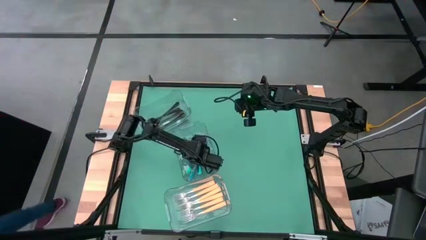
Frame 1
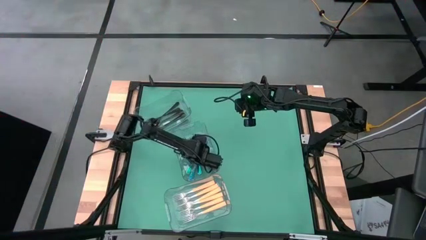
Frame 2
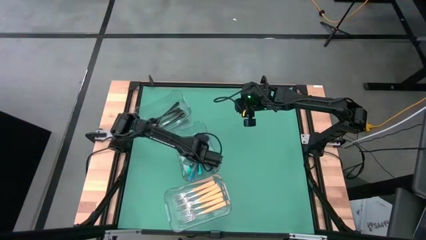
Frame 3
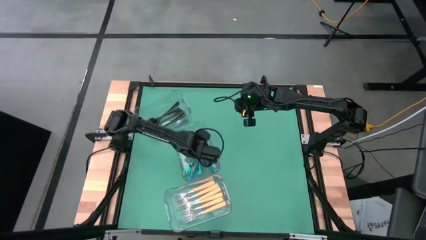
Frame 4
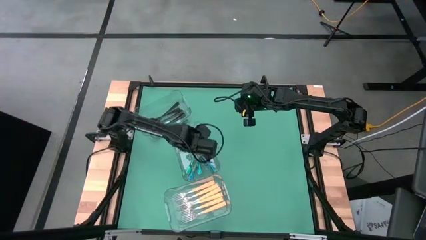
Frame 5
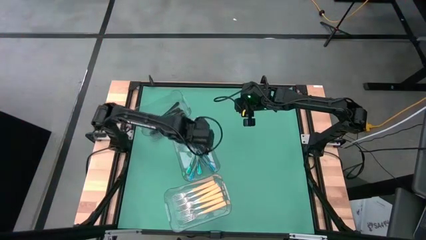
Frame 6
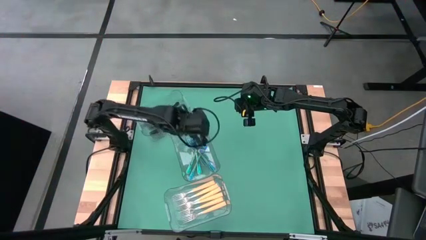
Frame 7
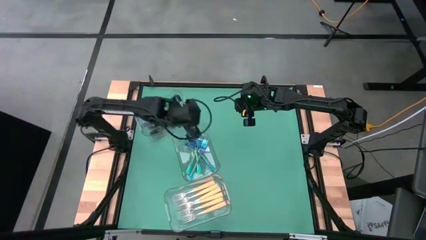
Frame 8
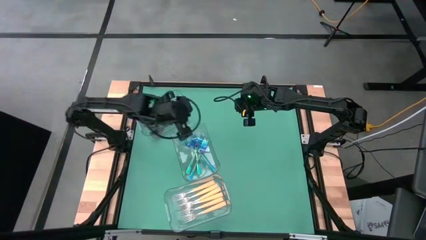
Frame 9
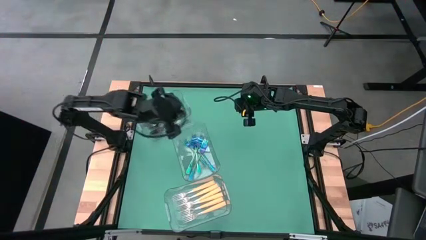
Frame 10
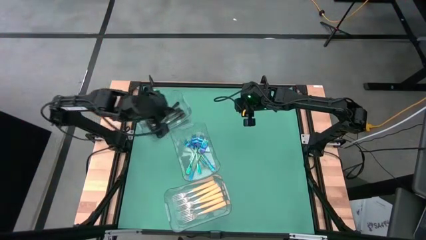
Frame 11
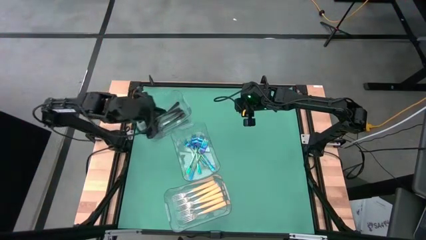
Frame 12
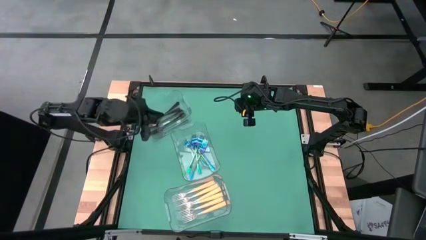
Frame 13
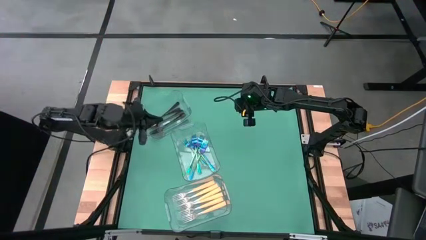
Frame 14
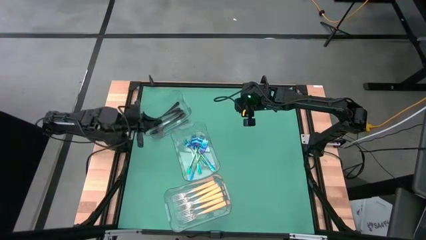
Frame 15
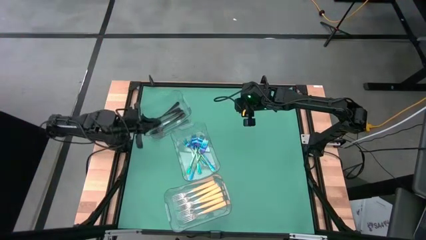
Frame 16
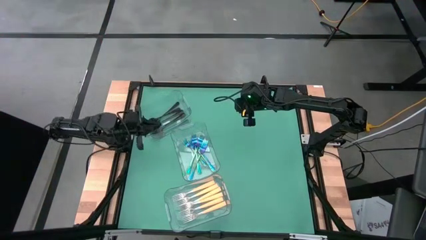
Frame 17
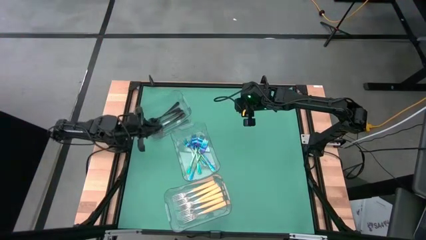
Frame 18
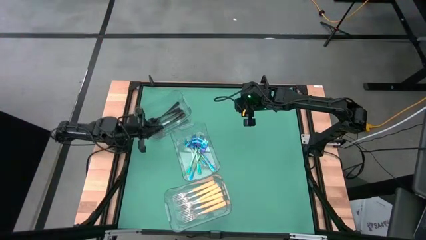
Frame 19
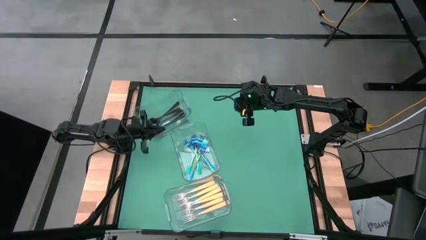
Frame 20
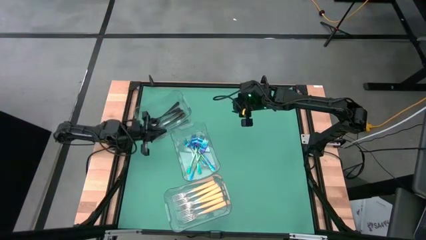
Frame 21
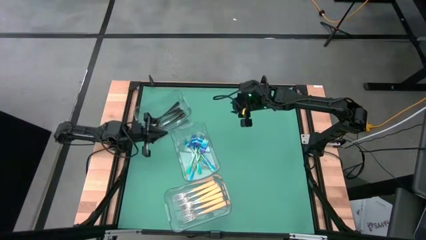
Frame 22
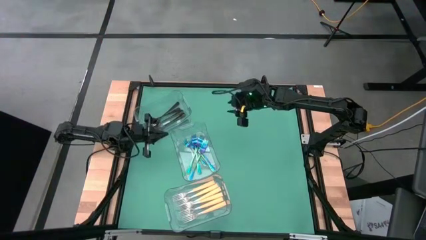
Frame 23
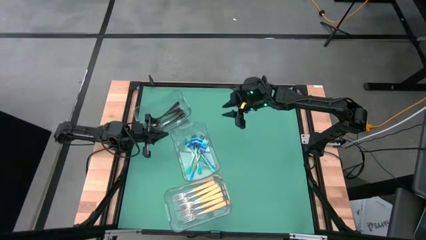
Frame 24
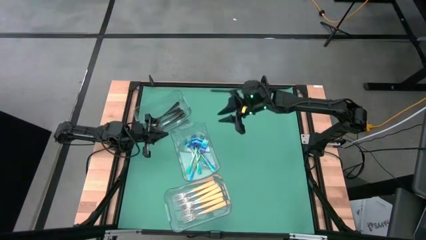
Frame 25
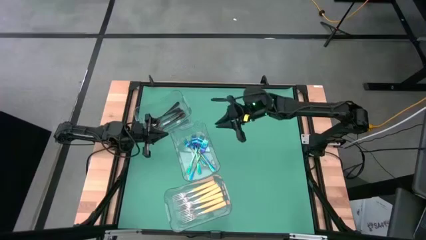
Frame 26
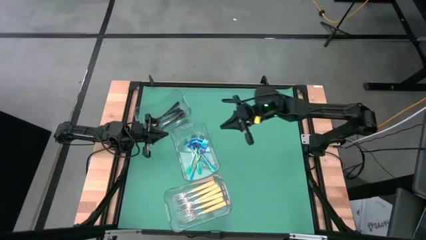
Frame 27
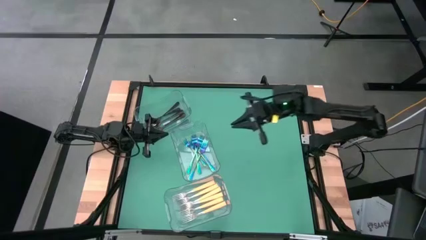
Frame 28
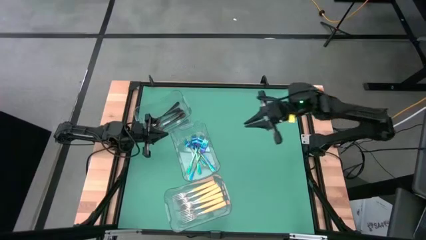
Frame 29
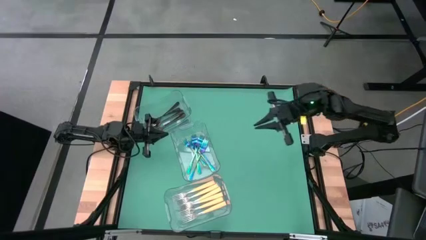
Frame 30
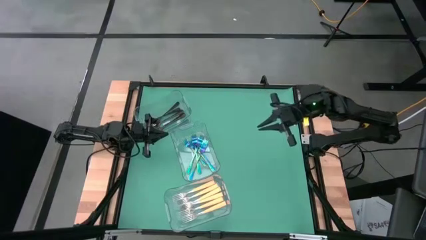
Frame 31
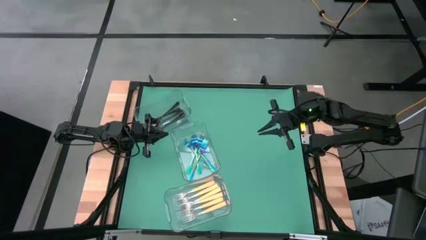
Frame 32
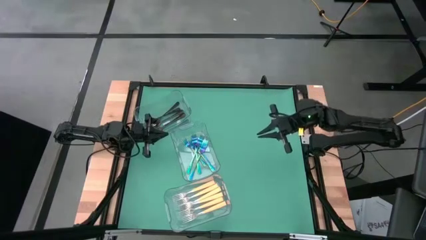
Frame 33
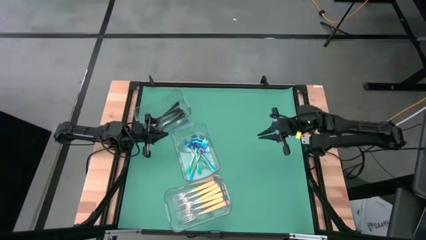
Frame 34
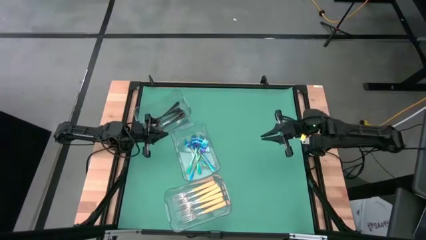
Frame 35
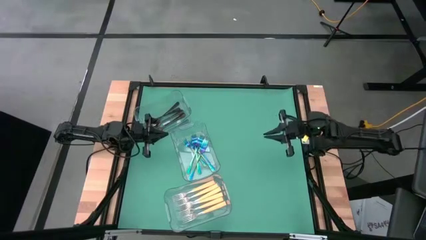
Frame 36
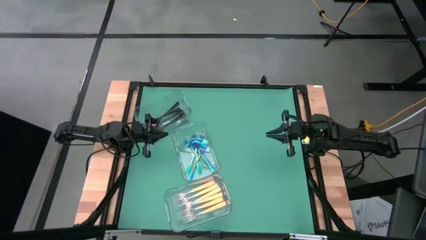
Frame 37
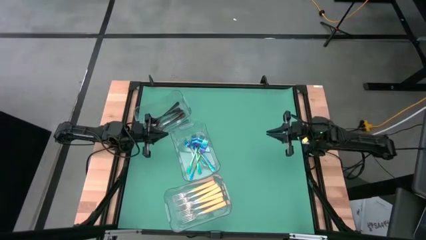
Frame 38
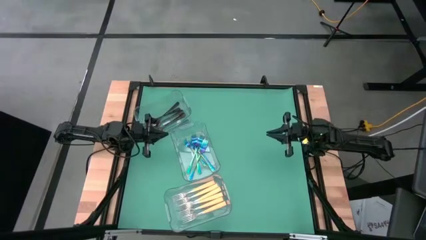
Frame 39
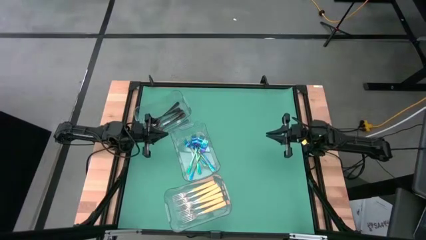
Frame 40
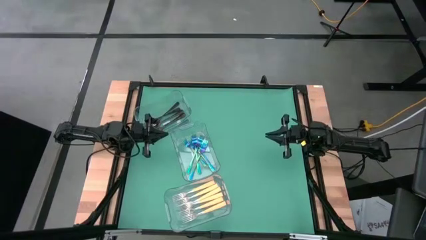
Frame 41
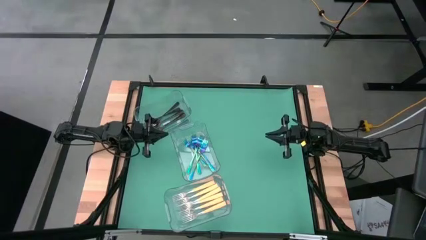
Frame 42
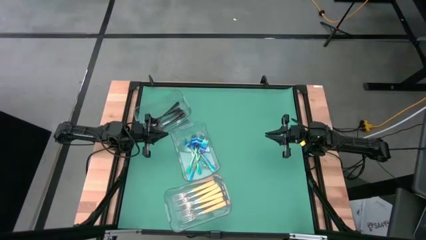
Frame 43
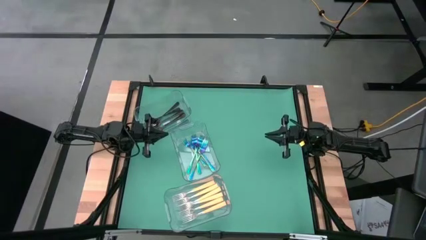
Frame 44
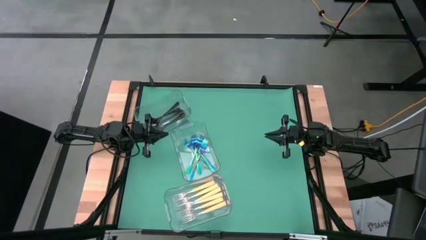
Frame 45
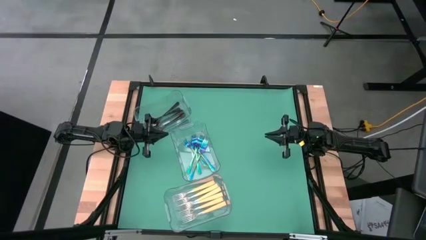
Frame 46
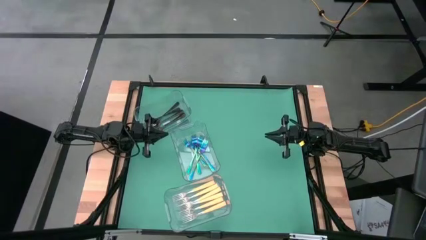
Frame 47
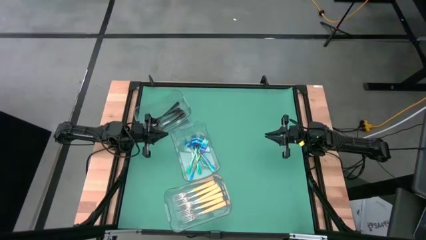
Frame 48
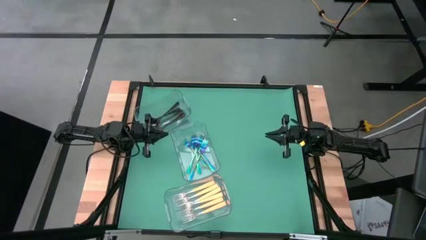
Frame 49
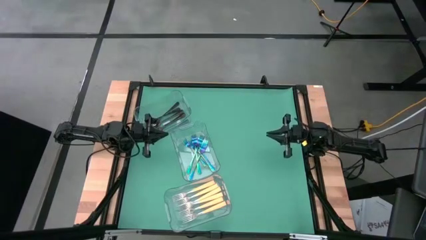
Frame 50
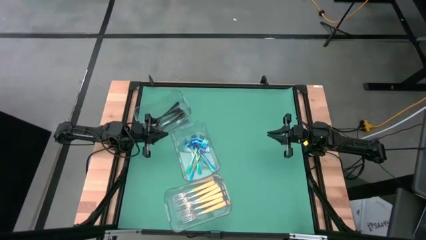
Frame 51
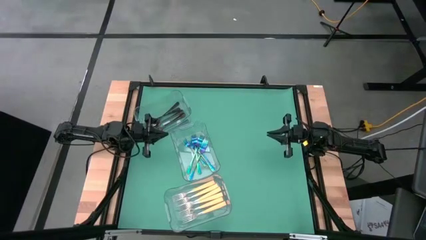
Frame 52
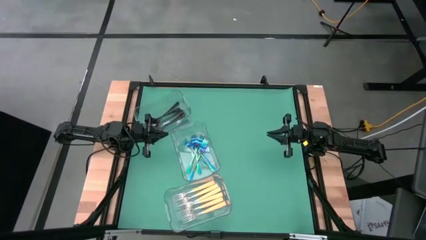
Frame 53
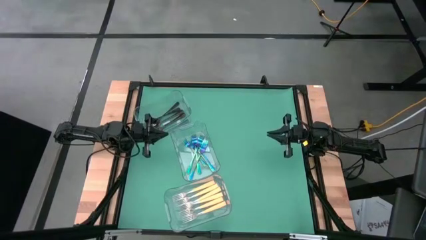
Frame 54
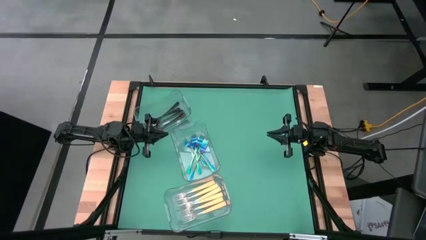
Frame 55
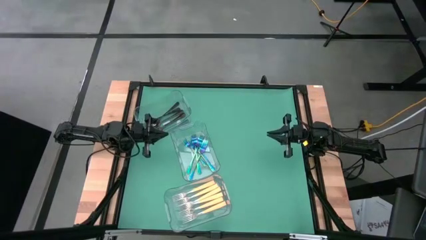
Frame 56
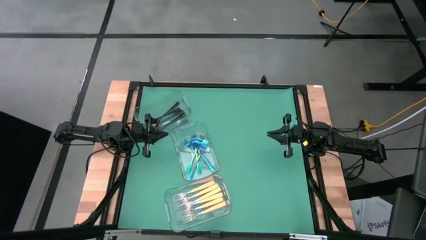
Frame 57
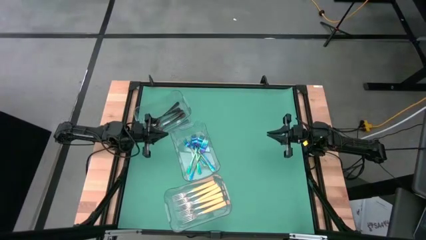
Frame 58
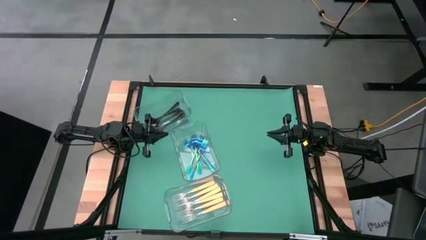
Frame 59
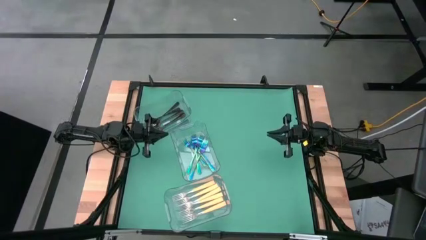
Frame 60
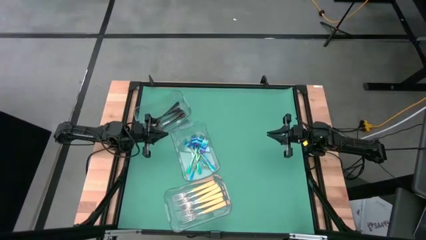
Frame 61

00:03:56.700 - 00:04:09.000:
Task: Sort silverware by color (type)
Return to Home Position

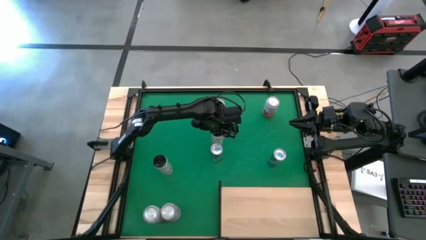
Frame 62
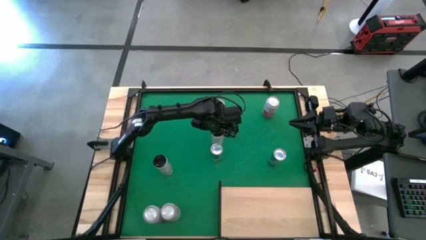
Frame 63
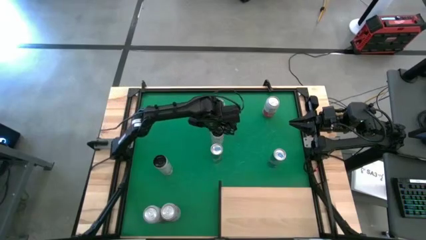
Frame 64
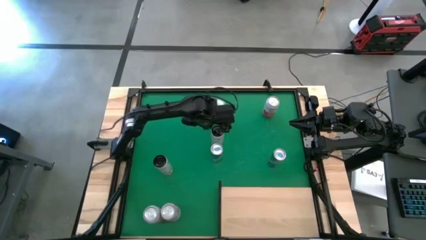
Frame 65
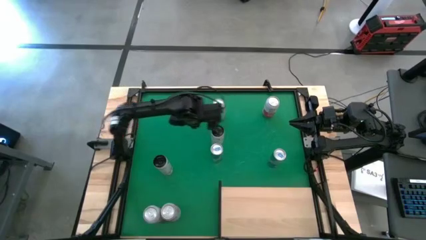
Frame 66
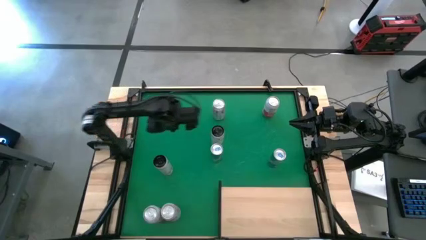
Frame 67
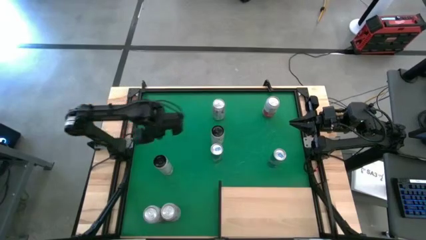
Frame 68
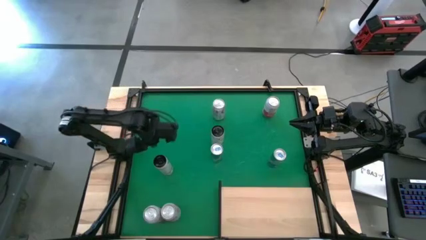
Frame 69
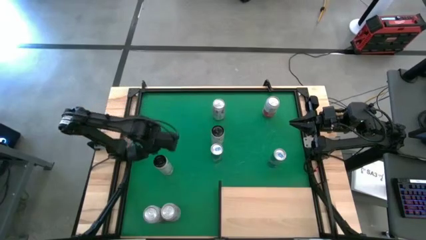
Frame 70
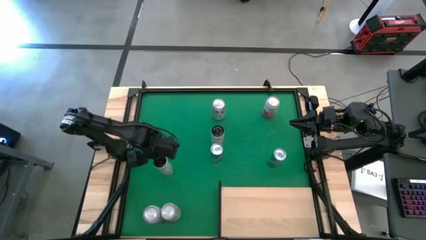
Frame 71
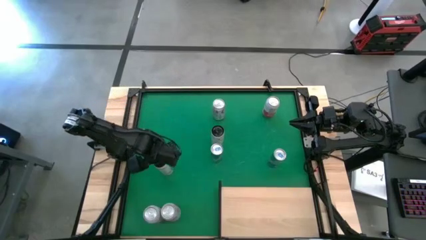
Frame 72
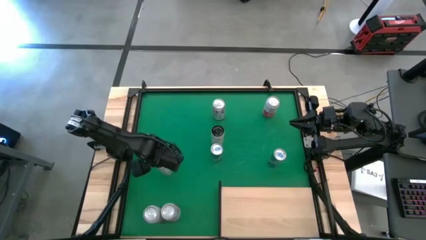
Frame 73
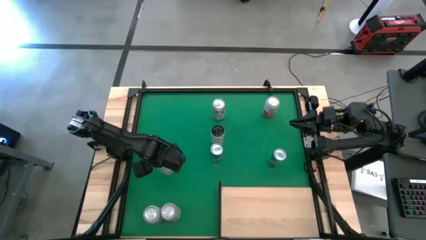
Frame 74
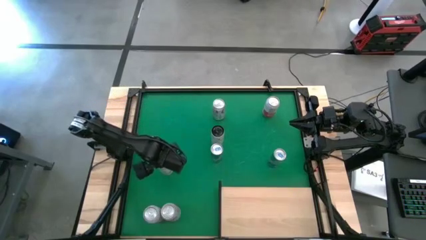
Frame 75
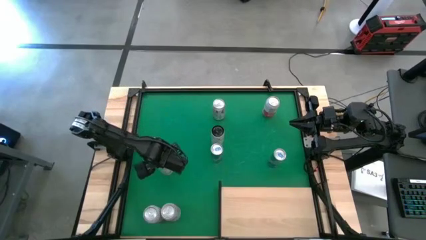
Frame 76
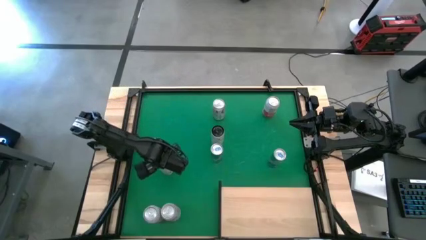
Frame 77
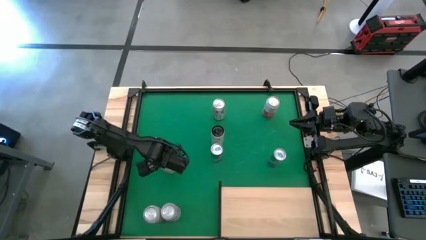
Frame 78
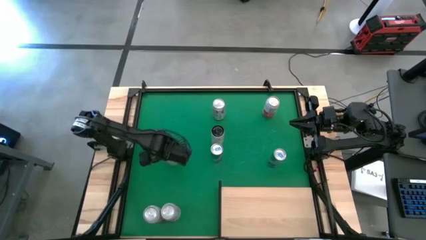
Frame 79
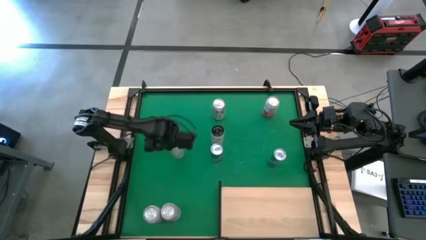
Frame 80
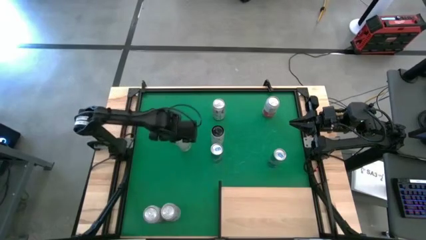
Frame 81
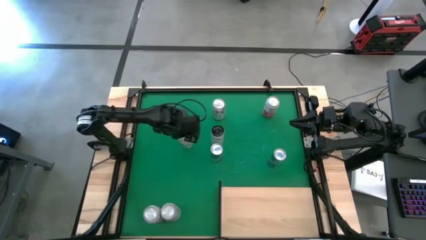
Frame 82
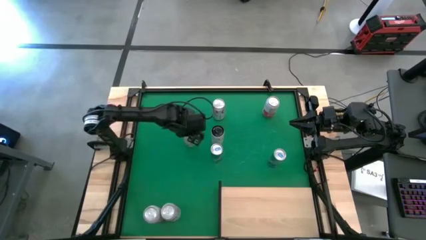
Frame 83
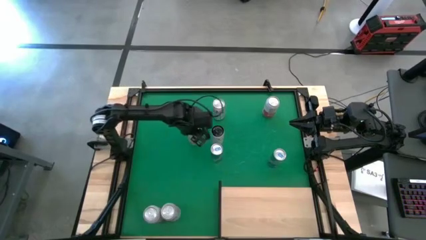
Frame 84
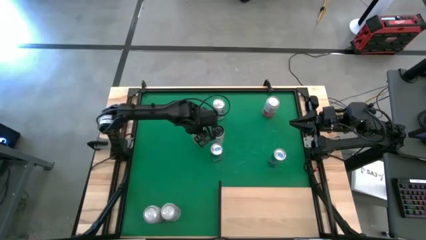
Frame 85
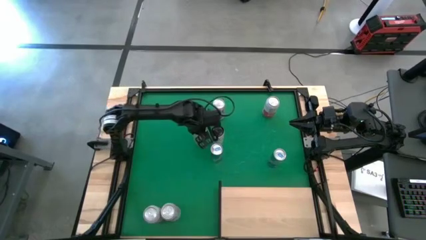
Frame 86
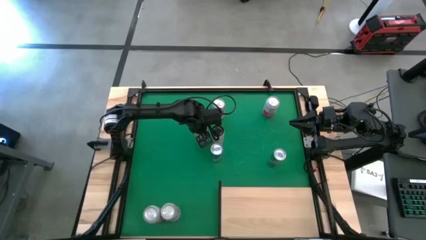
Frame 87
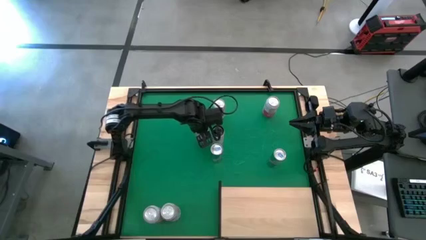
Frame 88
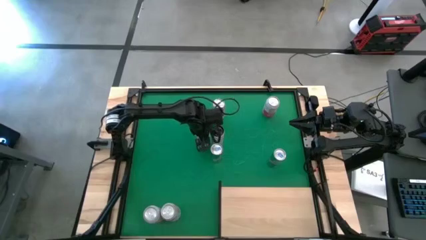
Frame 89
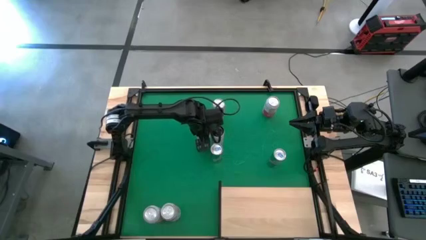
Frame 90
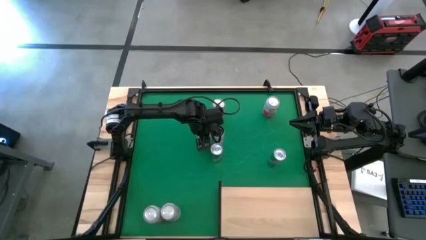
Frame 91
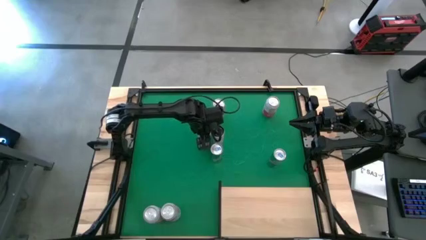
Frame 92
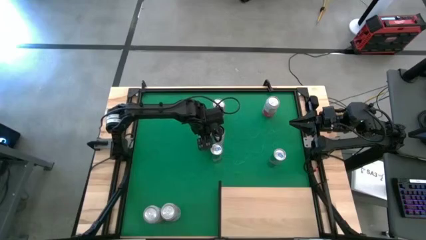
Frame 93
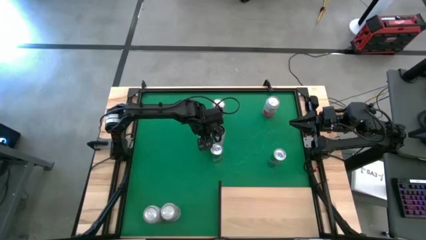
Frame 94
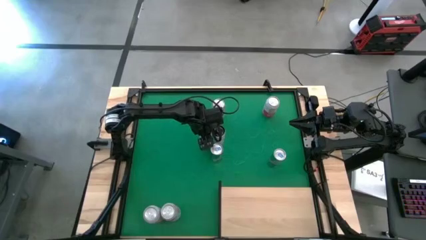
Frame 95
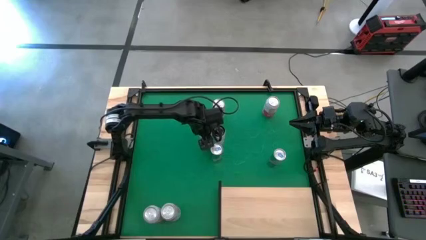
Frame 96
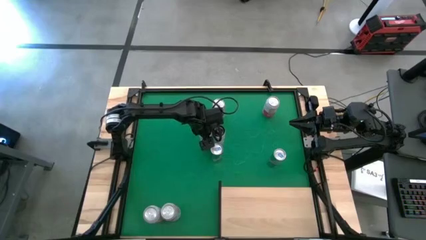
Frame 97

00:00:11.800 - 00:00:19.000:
Task: Place canned beverage on shelf
Move the bottom white yellow soda can to the middle of the table
